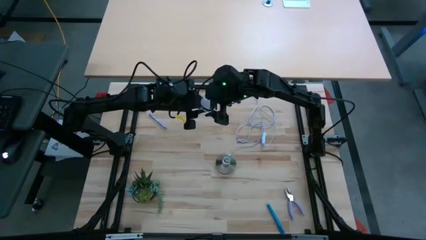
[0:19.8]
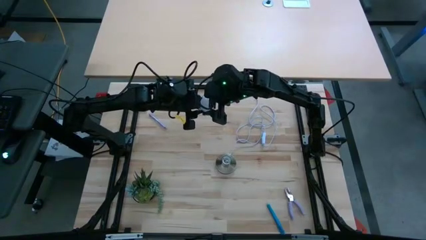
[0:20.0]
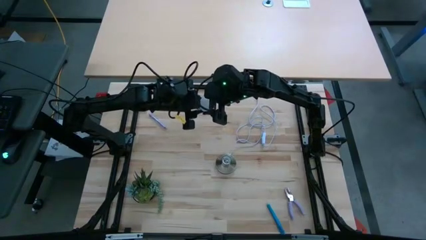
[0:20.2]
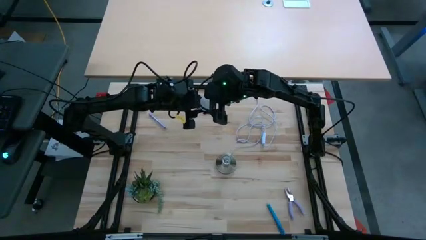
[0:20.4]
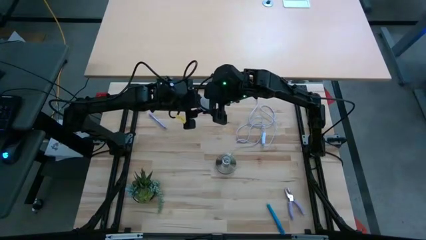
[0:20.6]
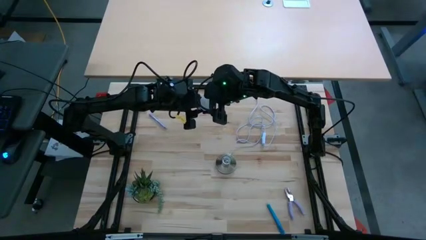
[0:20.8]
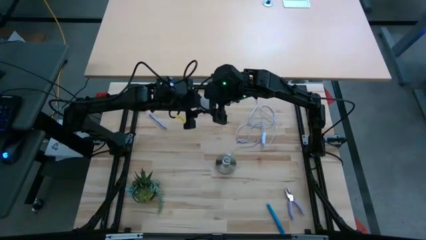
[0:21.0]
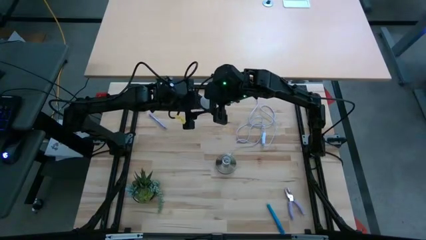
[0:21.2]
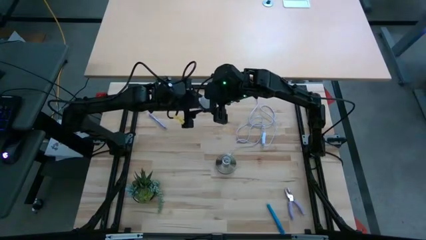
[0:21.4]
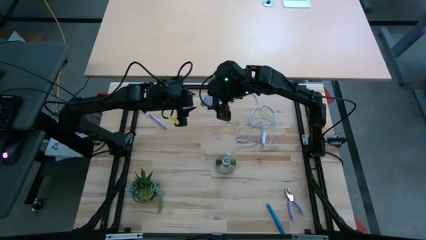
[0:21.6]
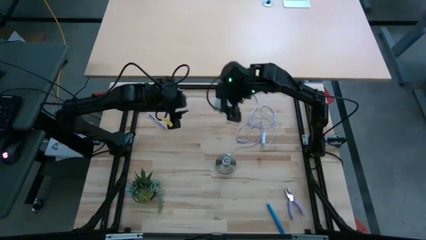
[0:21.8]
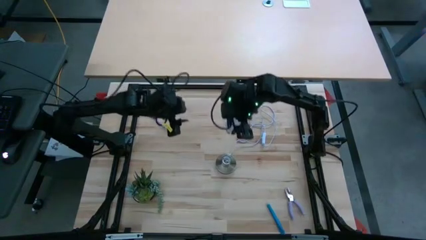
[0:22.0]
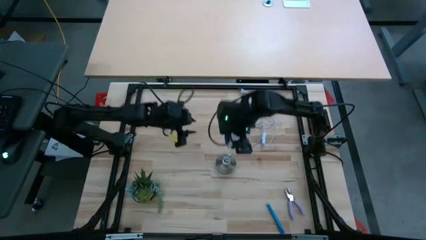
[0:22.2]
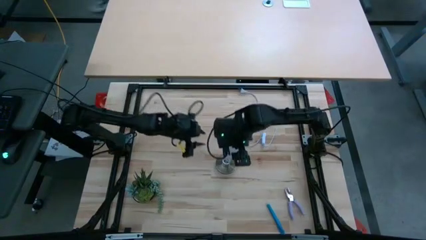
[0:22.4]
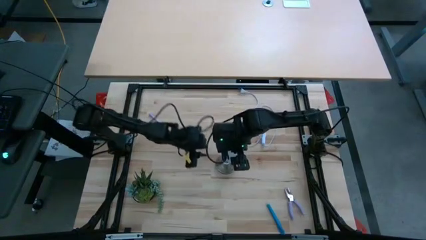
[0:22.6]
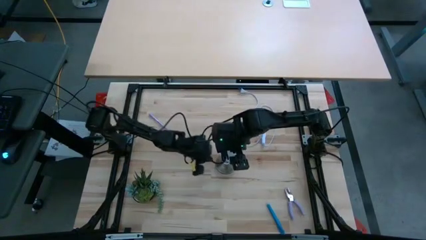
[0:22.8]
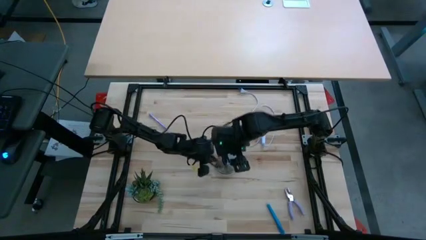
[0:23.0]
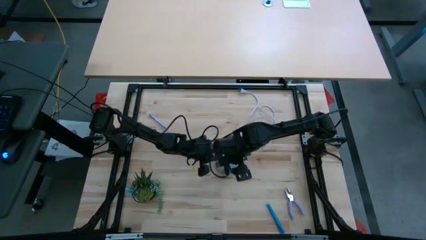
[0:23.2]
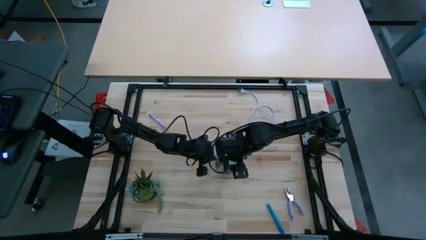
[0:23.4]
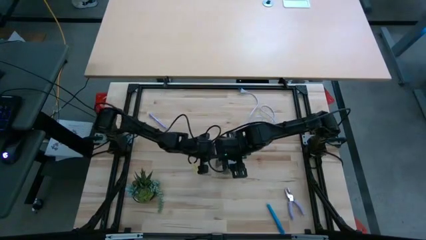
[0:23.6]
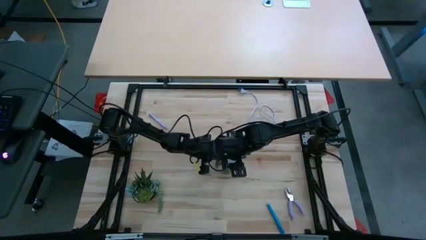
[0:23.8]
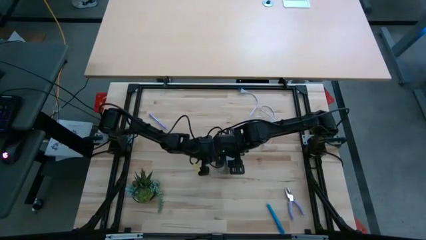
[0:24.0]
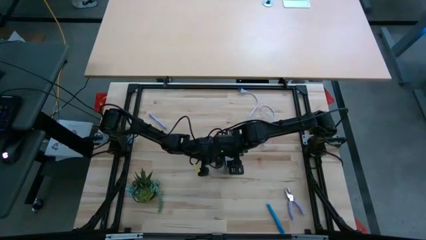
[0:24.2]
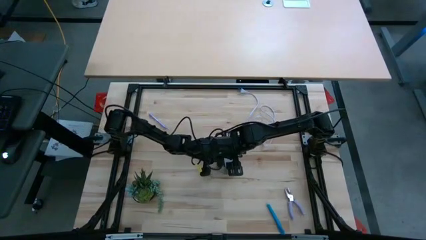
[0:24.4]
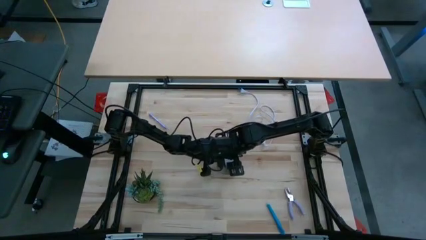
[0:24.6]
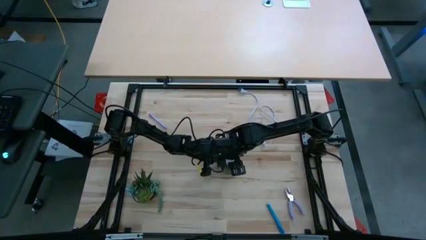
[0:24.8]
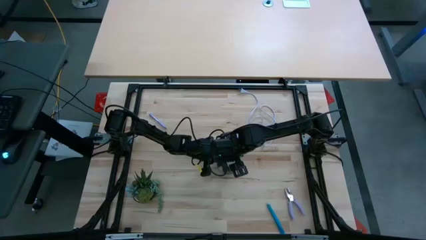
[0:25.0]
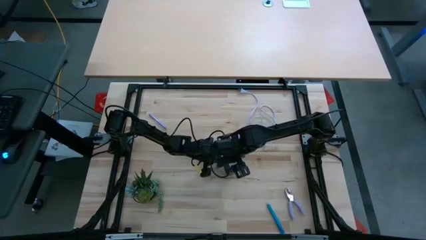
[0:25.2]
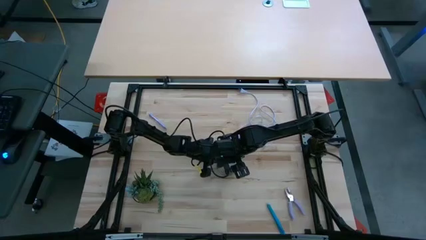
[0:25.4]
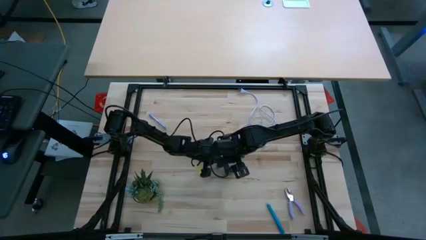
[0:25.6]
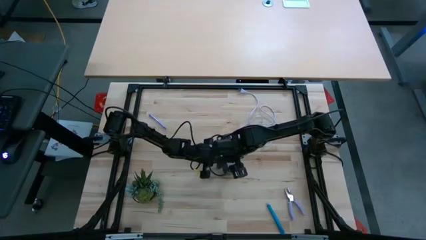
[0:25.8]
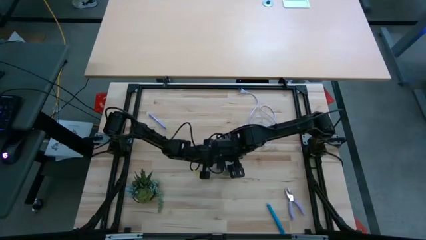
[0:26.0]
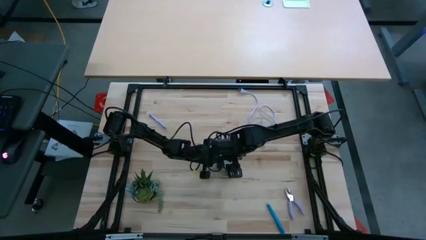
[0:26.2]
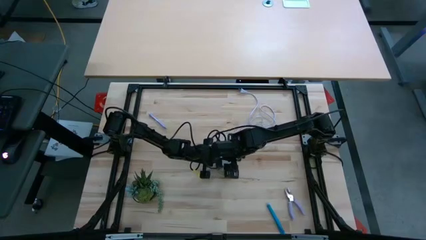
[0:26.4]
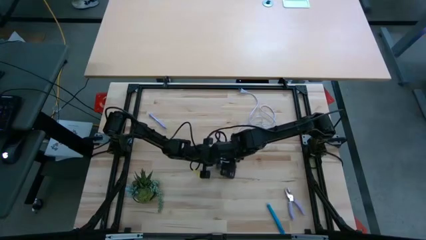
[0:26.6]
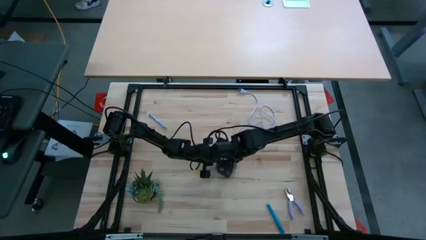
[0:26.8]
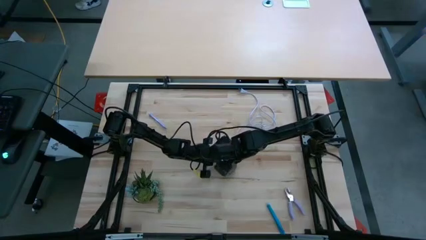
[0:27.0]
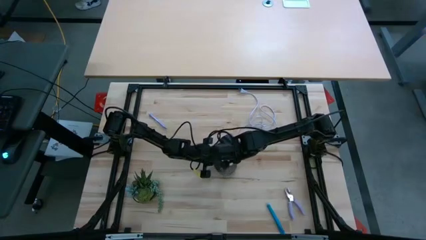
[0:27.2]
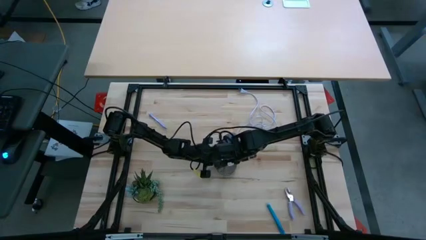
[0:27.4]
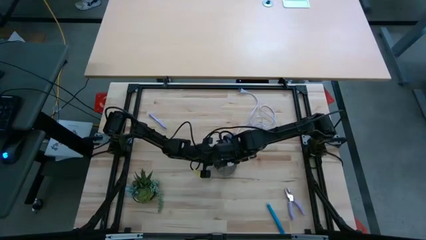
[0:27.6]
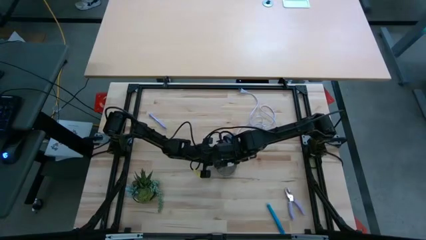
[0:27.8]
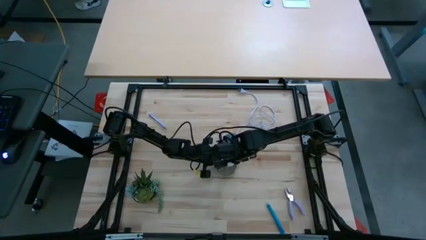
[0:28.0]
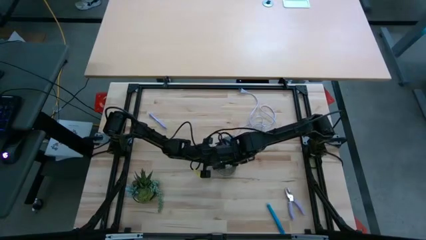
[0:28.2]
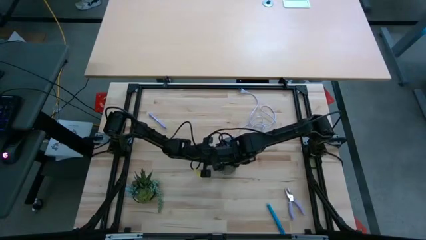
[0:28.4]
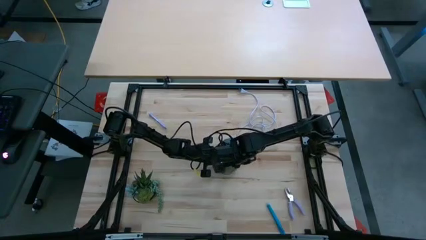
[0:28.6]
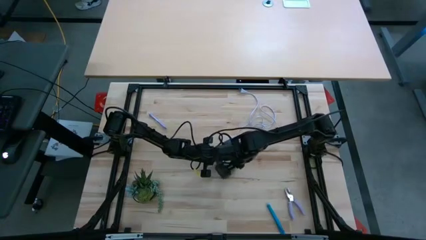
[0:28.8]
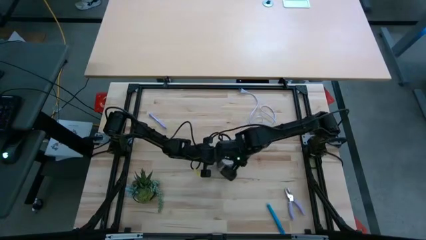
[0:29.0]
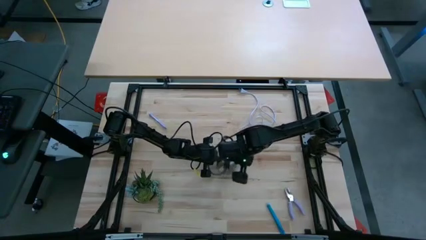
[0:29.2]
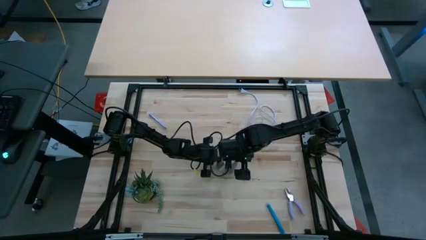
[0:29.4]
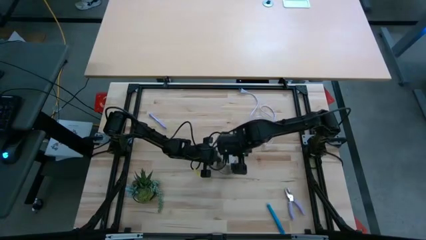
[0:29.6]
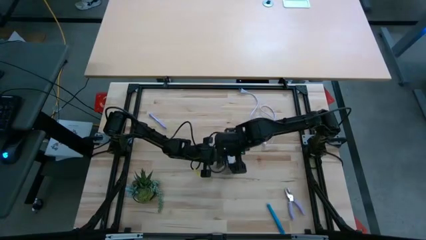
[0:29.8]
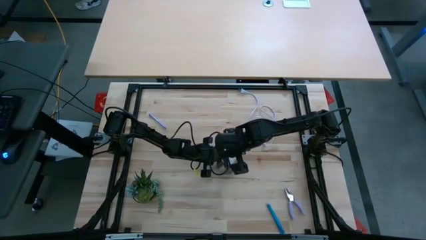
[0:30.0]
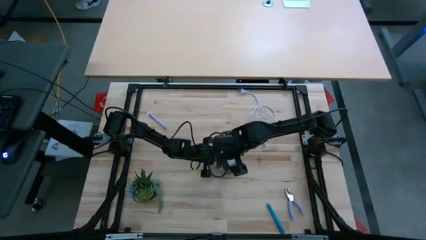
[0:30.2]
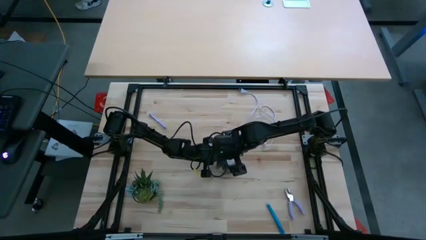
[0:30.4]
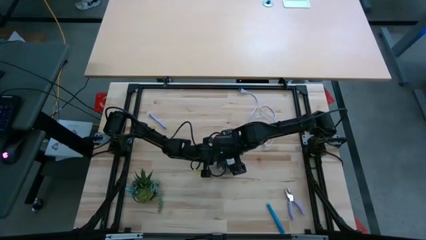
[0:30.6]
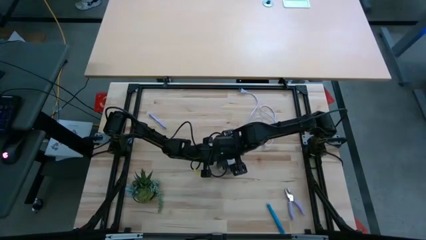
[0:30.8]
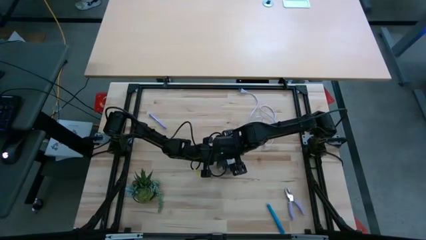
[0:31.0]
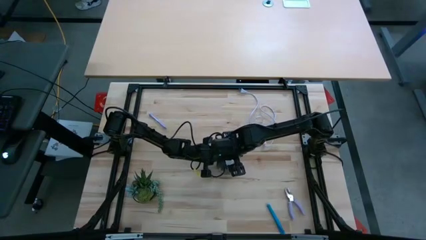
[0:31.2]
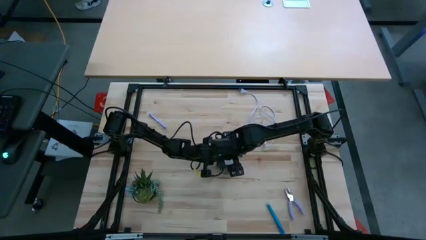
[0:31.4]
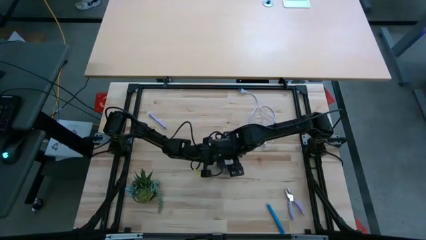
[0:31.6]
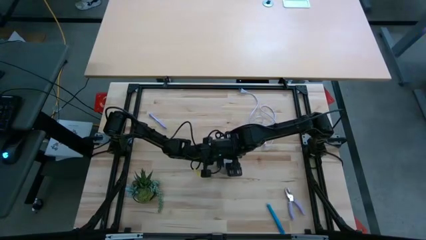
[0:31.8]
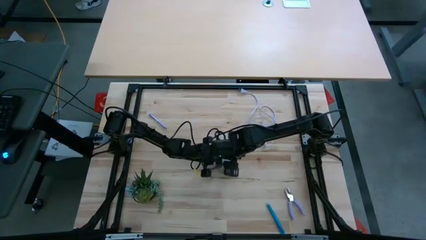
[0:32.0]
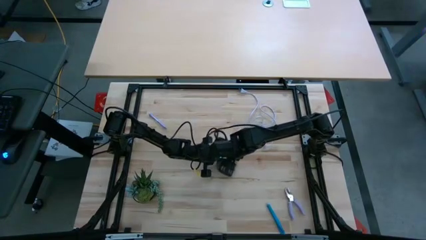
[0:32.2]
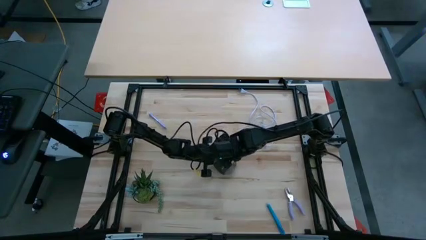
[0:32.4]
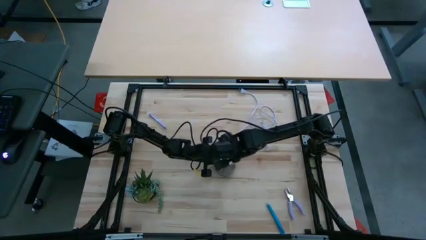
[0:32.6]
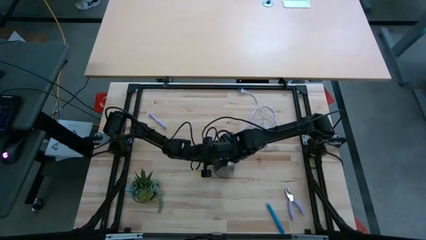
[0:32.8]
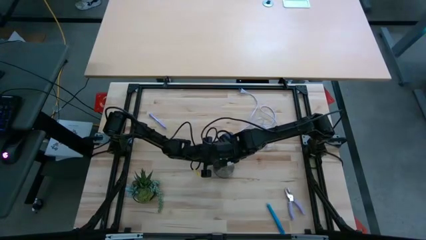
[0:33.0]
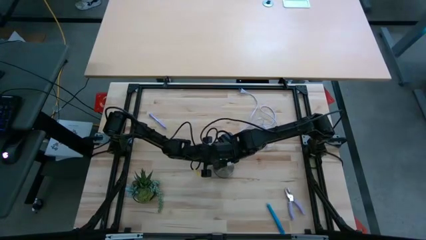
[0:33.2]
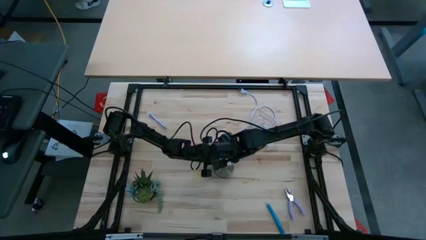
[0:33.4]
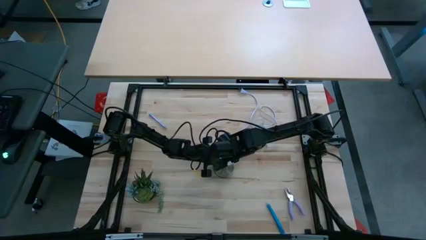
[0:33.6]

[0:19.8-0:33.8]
Task: Screw lightbulb
Insert the lightbulb in the lamp
